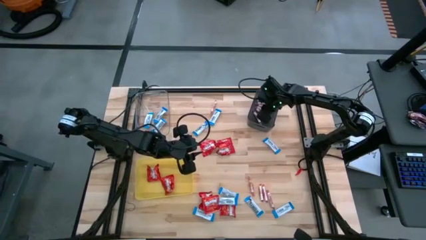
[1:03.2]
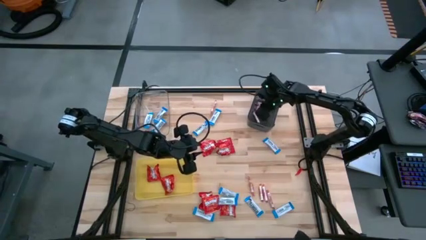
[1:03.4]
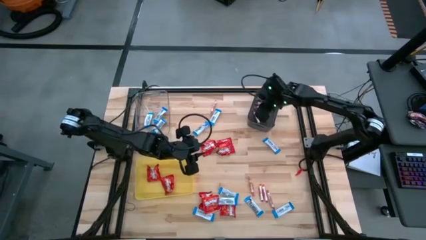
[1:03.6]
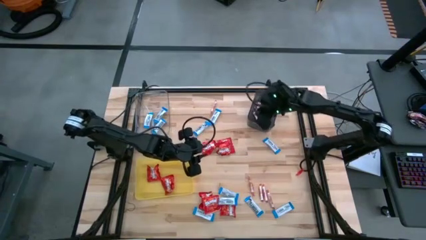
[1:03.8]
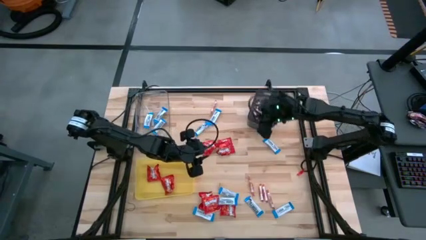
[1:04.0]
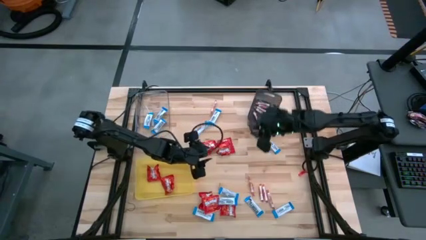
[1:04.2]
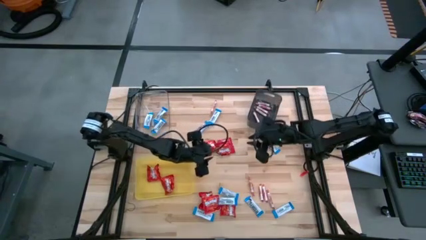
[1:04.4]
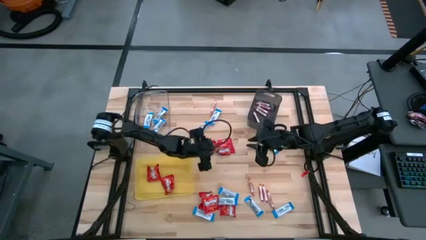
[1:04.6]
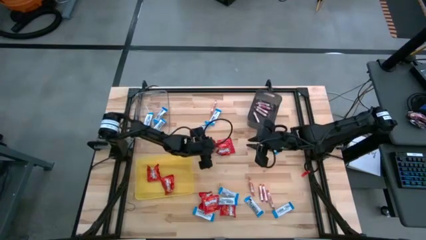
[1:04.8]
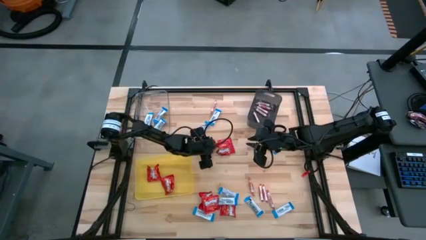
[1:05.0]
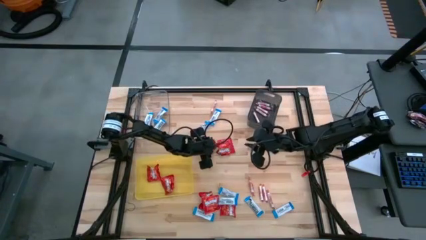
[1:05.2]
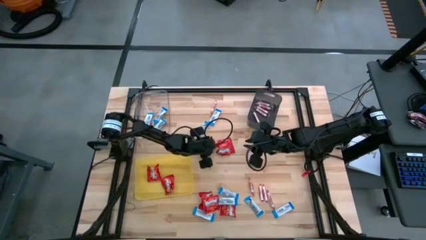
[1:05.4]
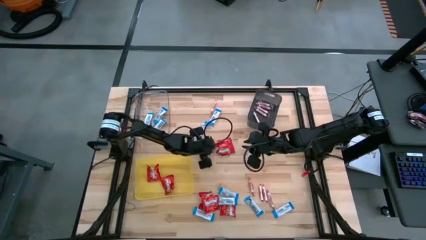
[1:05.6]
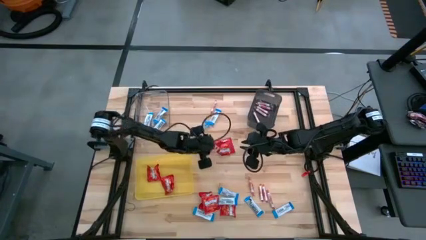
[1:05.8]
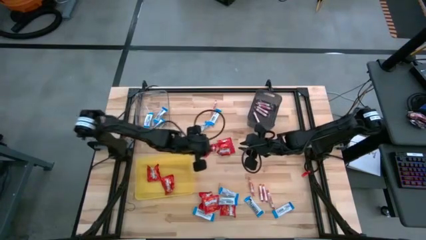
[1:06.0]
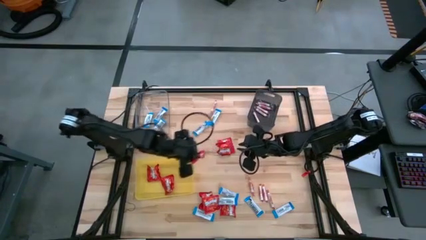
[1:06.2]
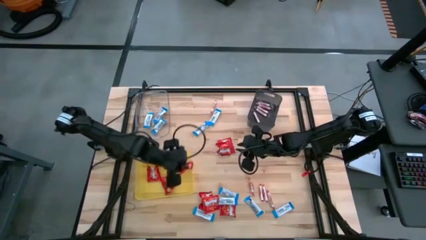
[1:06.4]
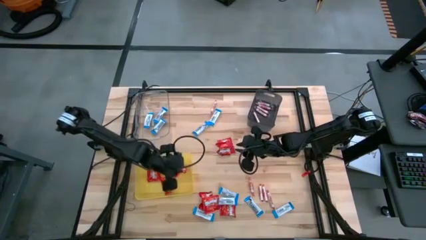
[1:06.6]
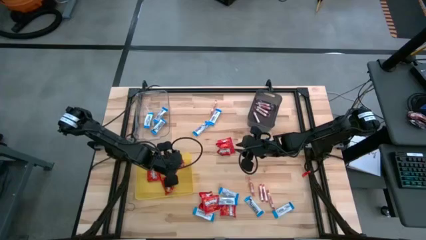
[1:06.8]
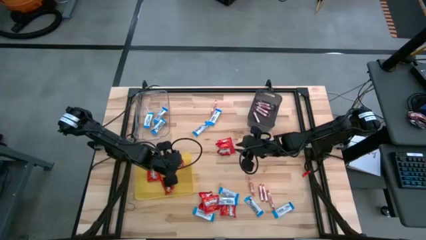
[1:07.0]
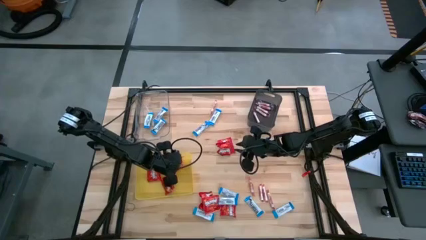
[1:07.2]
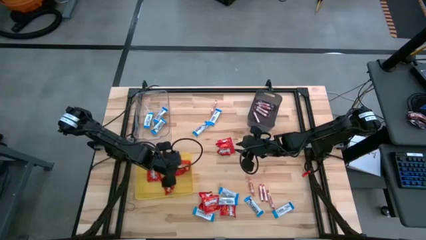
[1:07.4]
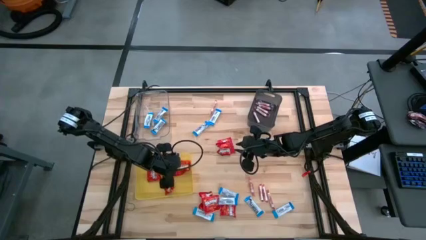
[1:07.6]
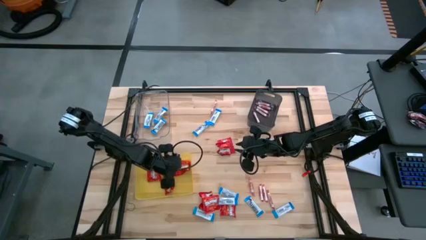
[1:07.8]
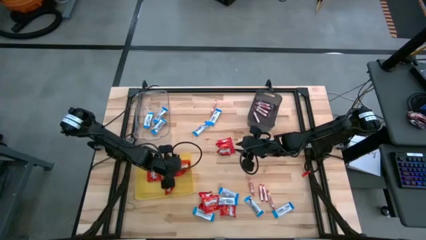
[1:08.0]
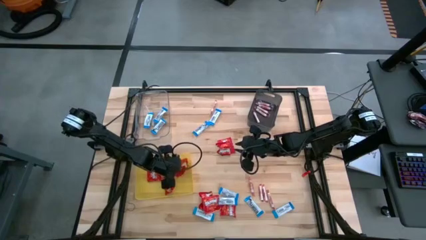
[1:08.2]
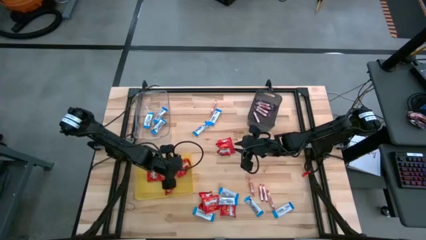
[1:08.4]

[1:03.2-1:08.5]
Task: Sort candy
Put the red chocolate into the yellow bin

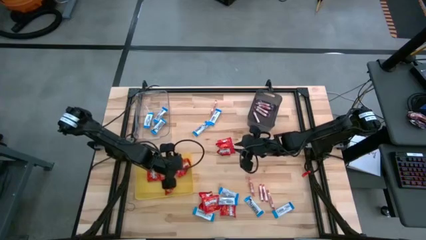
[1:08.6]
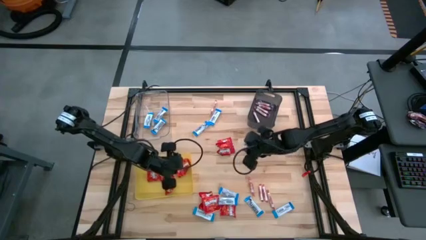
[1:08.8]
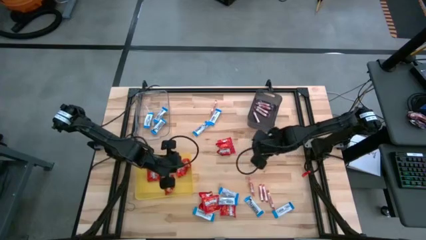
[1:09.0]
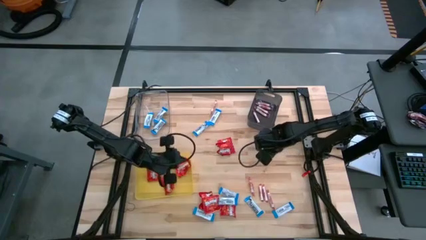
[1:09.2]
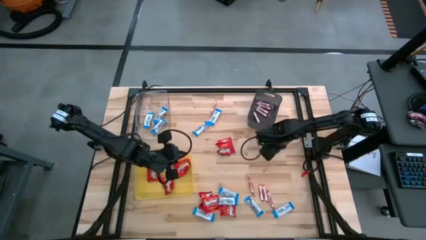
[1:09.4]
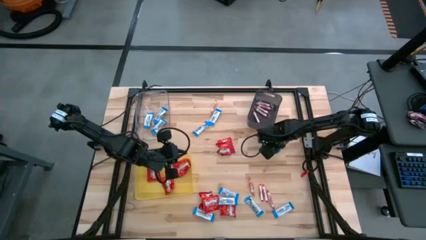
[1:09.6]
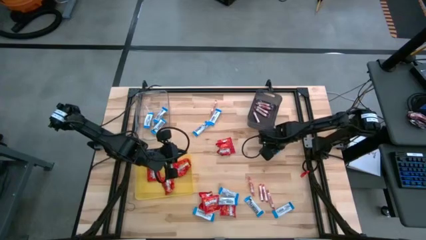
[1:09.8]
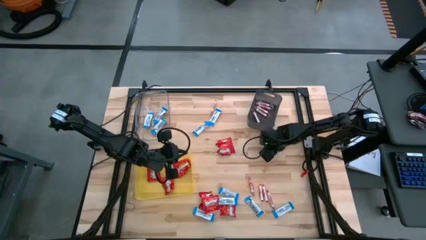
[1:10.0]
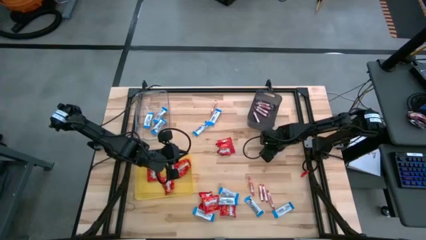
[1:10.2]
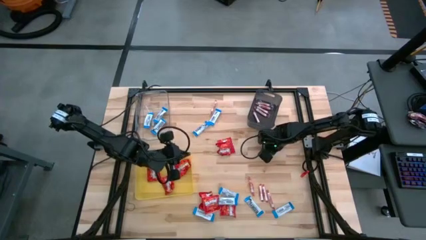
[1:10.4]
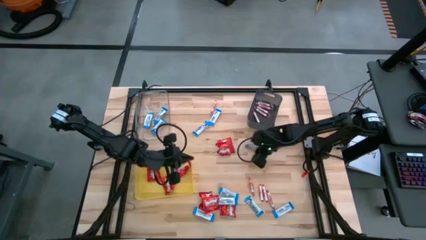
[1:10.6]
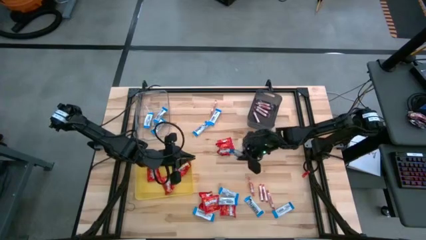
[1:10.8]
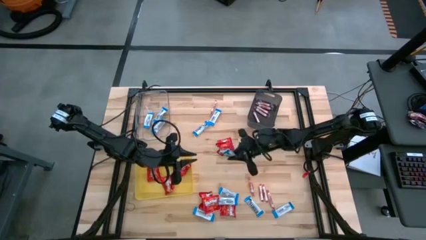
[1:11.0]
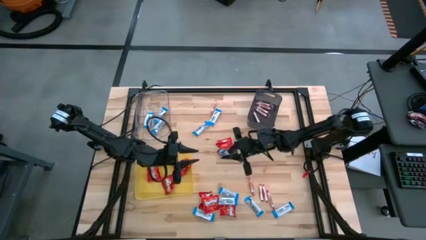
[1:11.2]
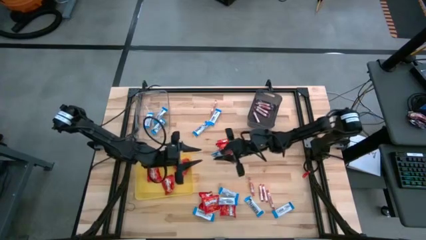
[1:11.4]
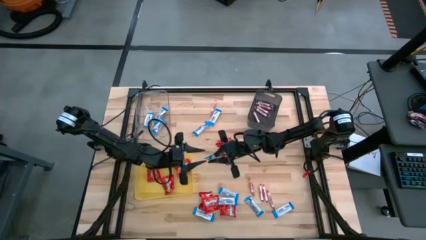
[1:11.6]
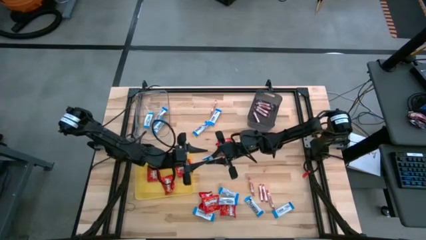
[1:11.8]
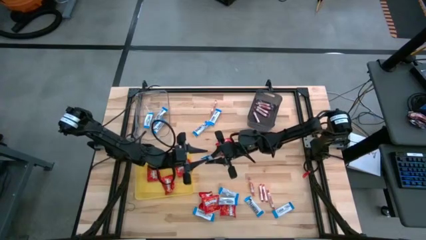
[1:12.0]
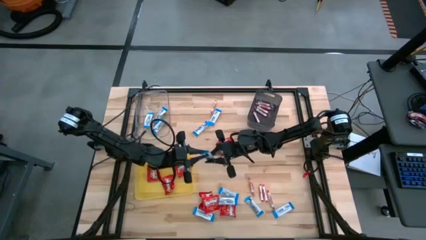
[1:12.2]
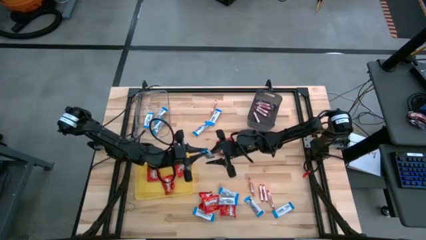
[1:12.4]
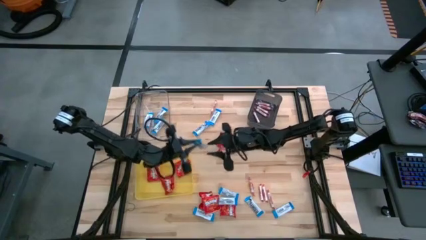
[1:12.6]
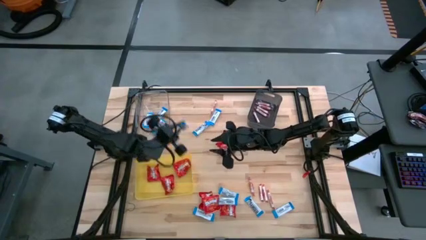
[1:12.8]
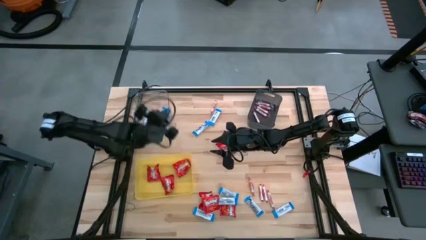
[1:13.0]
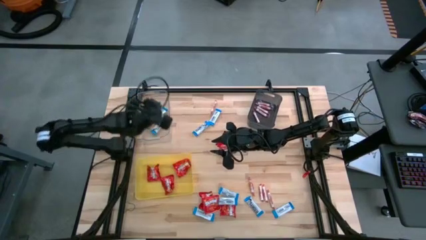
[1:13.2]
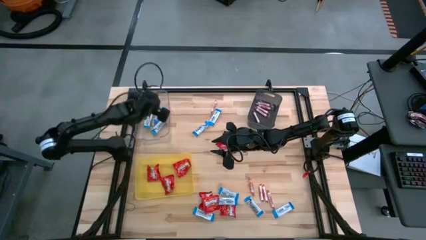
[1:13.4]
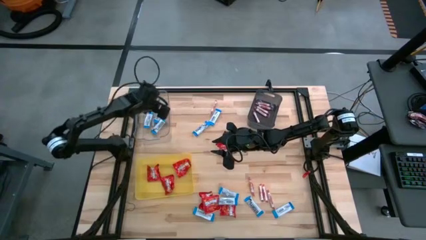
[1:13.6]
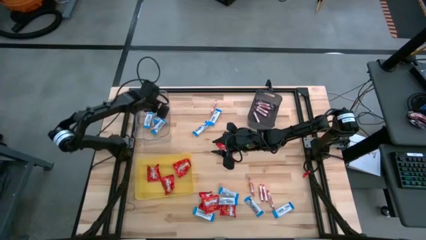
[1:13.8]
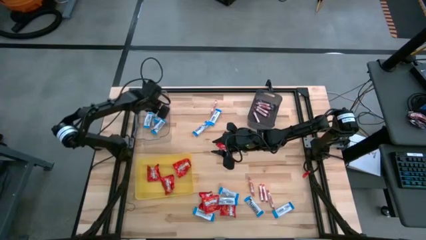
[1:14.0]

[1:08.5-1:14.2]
Put the blue chocolate into the transparent bin

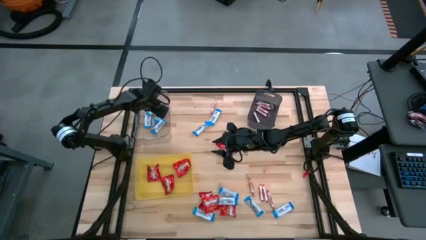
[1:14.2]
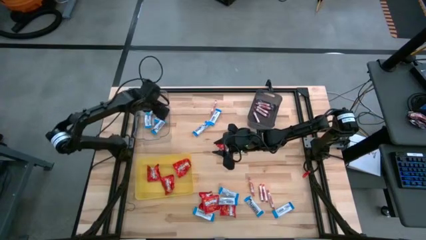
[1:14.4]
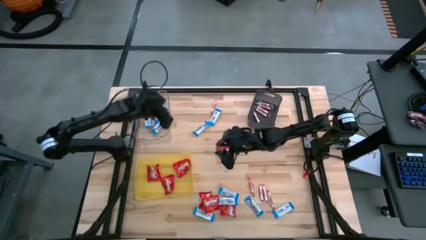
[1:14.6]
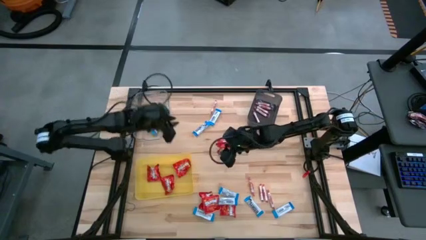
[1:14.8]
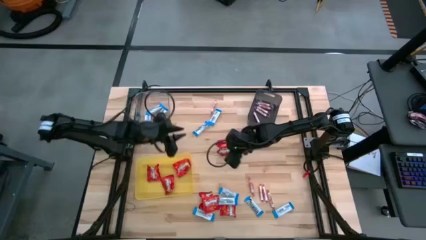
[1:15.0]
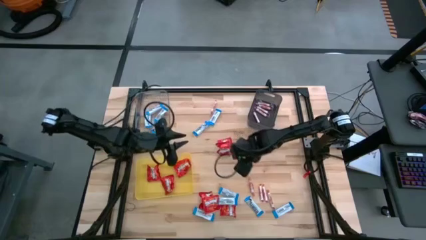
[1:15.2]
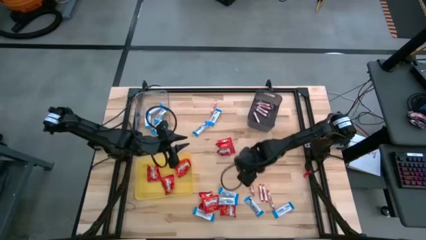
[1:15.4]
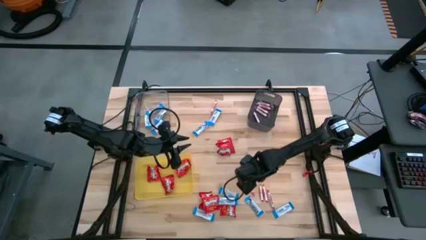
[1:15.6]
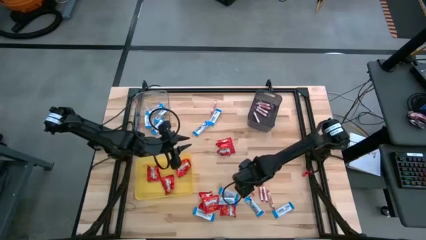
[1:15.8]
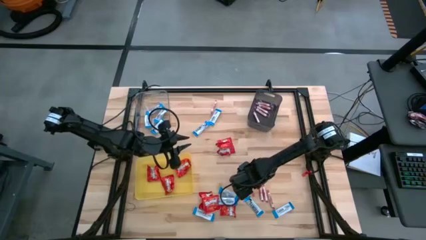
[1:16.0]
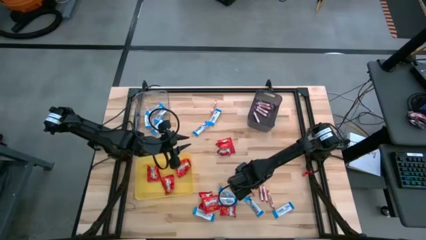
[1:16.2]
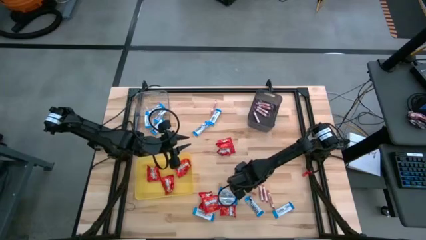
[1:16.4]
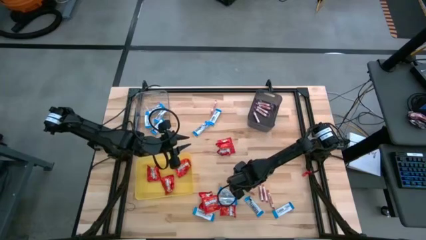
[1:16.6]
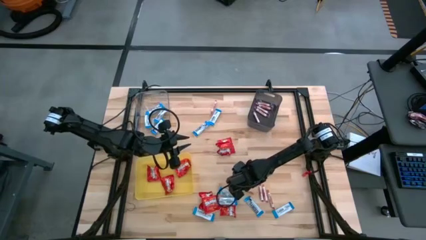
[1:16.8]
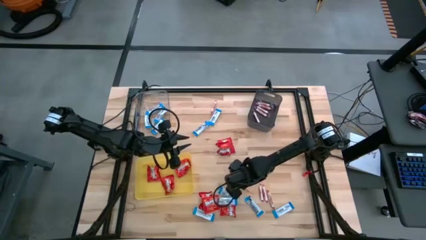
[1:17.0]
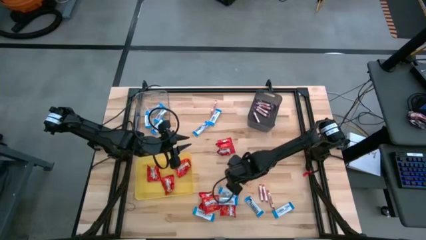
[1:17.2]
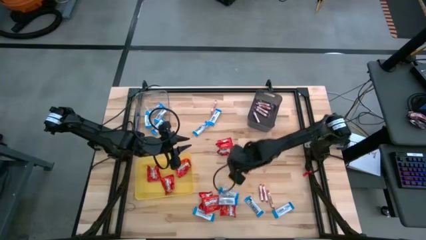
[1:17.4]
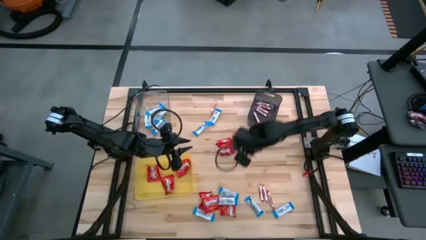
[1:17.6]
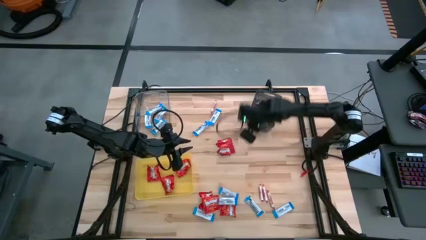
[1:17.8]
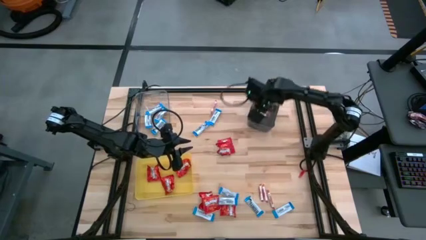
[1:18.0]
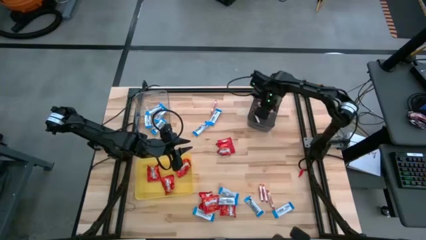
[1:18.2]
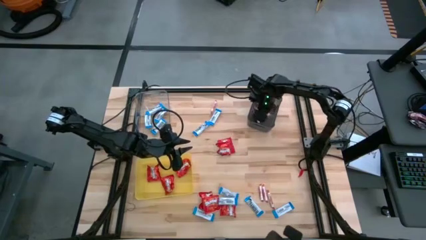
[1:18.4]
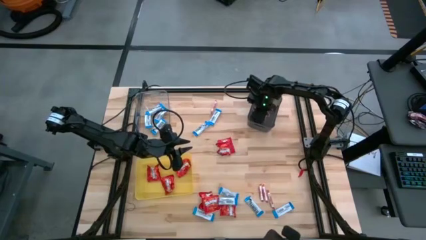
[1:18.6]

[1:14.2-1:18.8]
Put the white candy into the black bin
